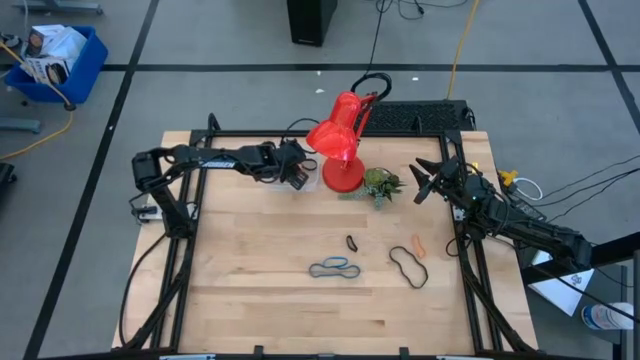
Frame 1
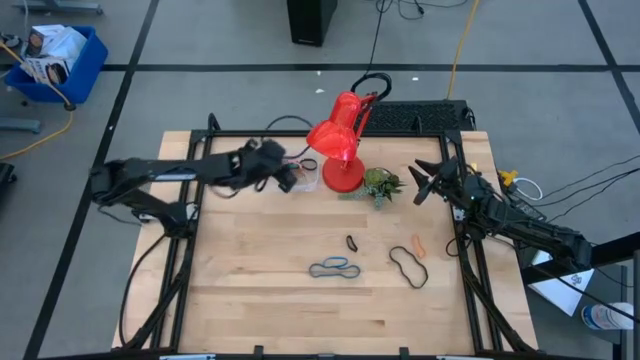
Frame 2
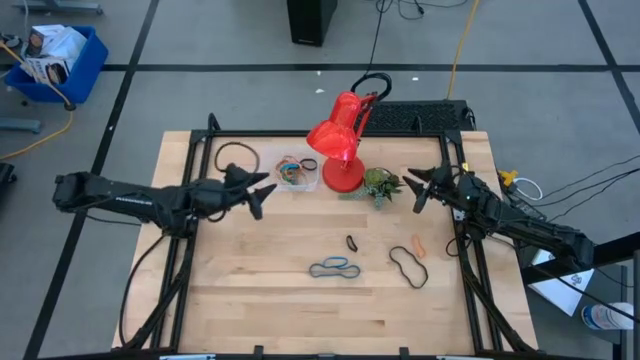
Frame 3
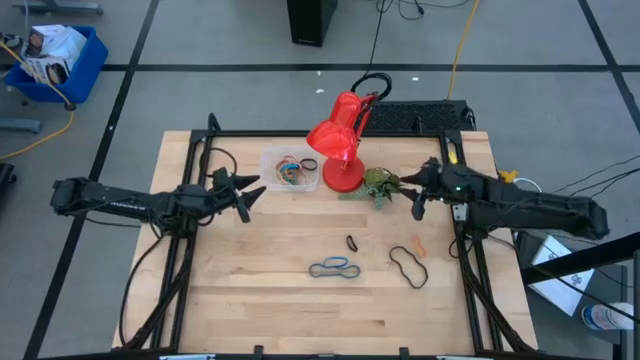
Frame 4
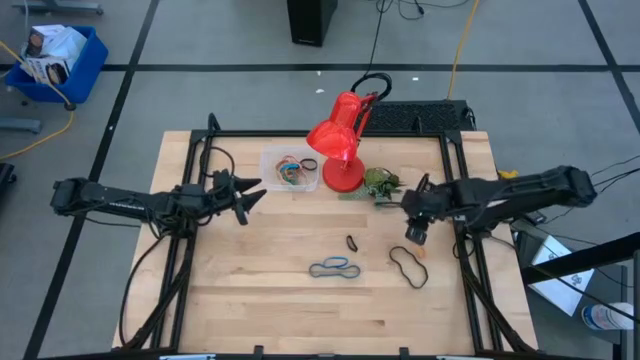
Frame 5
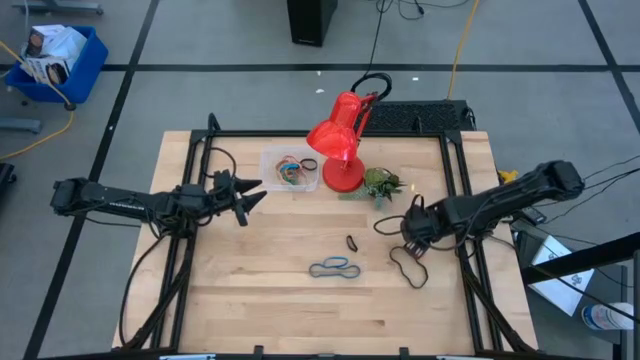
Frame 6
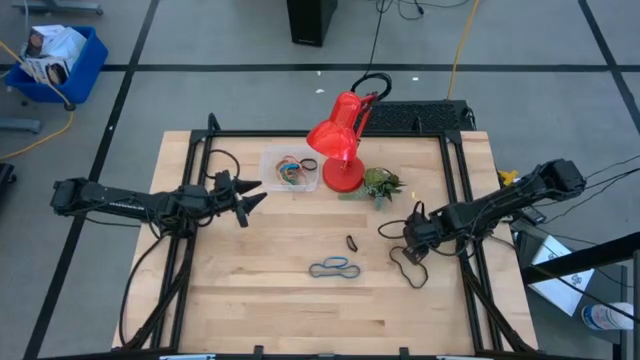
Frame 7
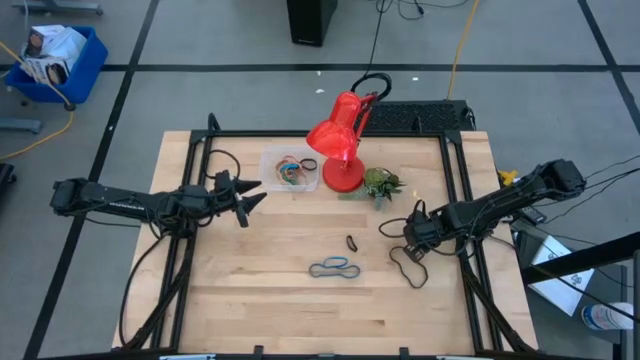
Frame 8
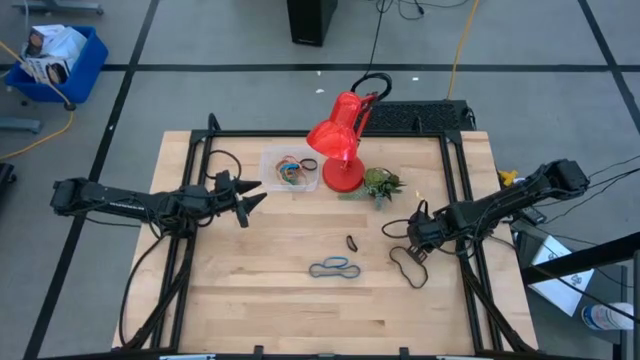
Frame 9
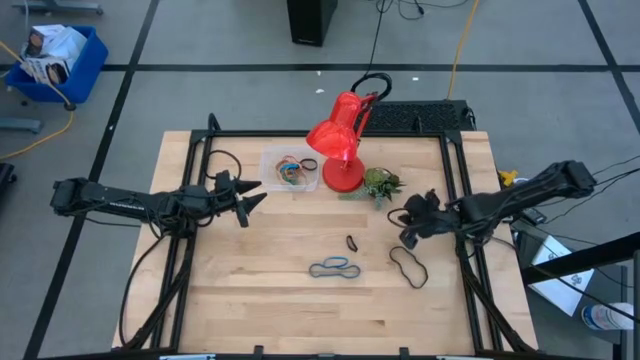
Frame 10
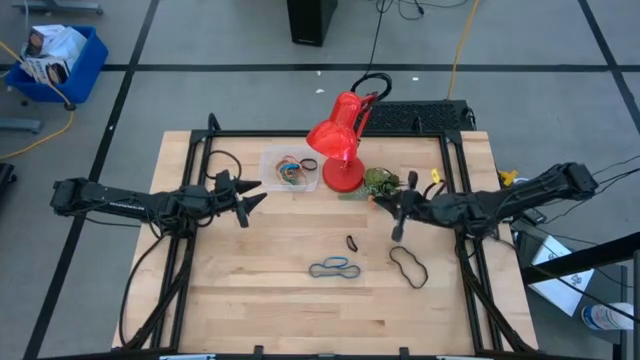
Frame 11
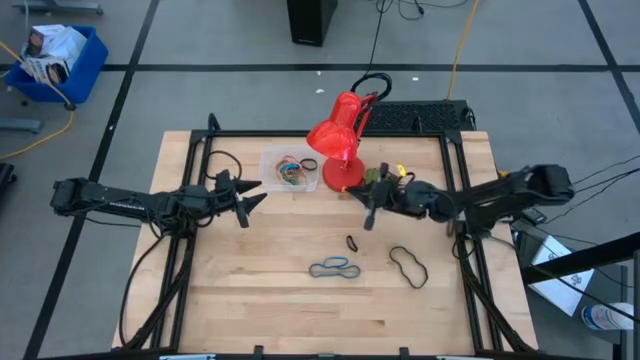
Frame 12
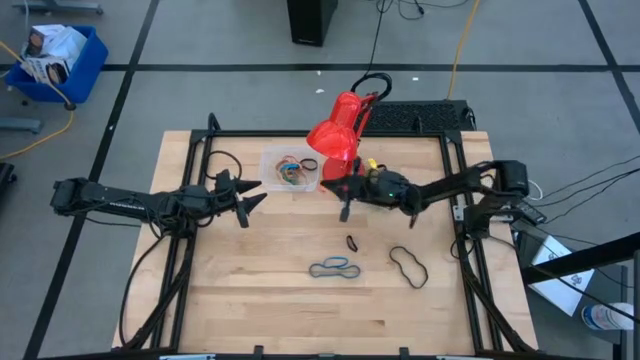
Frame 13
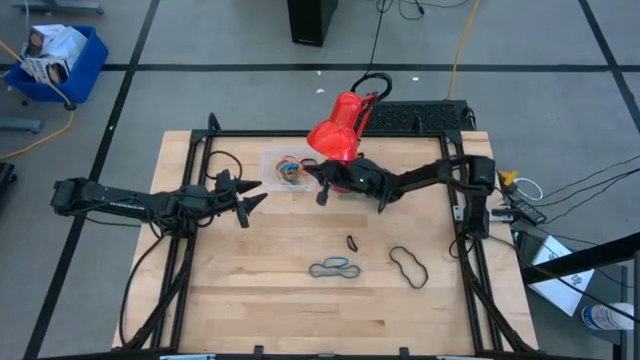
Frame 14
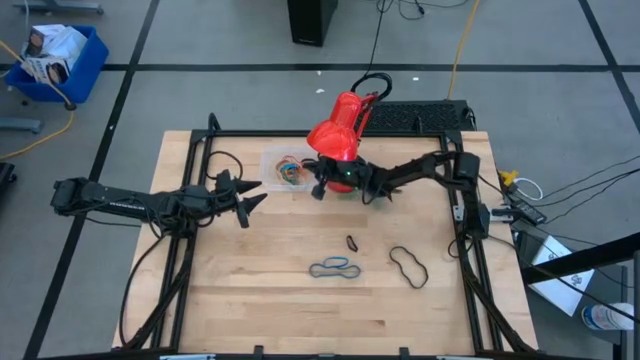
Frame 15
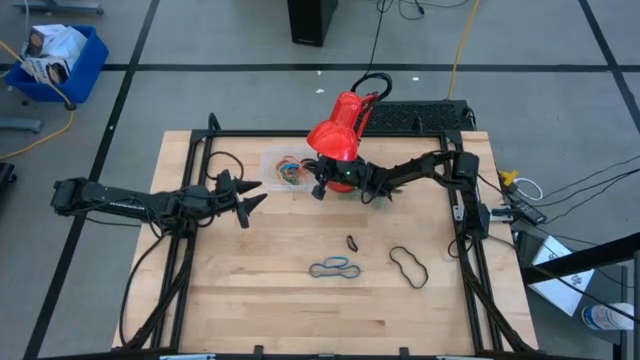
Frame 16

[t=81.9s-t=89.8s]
Task: Pick and place rubber bands into bin
Put the orange rubber band into the transparent bin

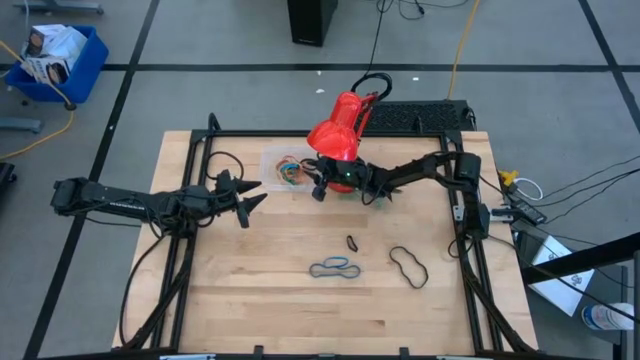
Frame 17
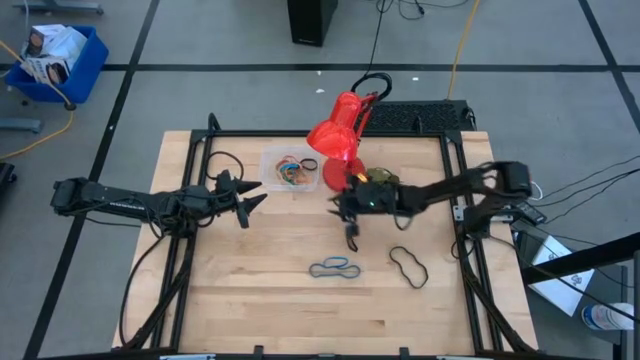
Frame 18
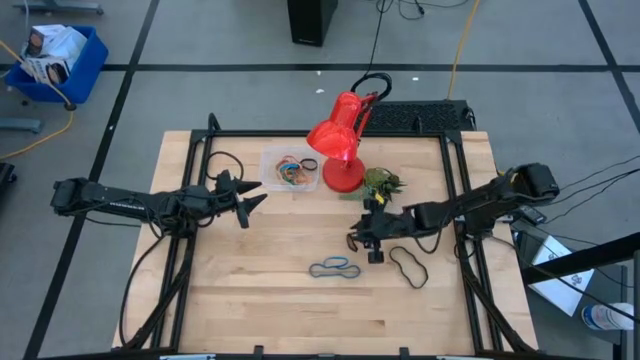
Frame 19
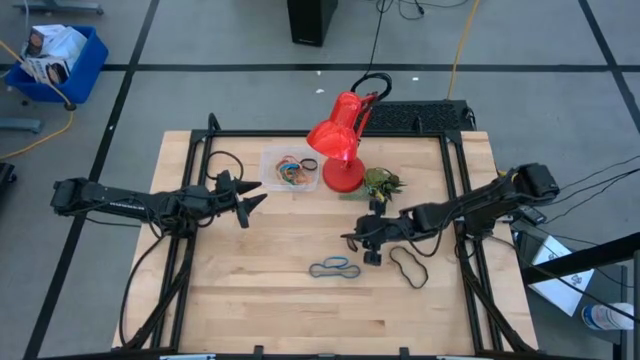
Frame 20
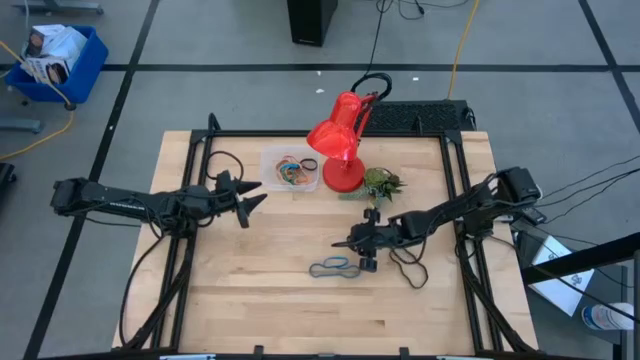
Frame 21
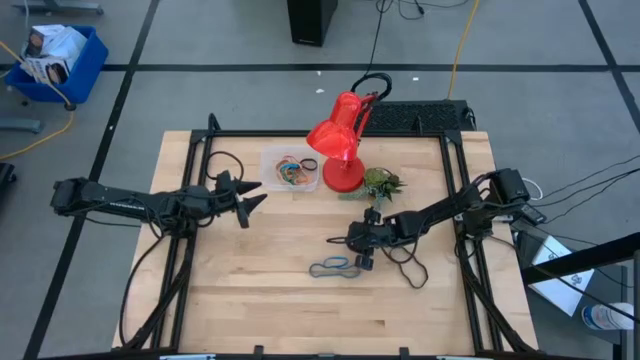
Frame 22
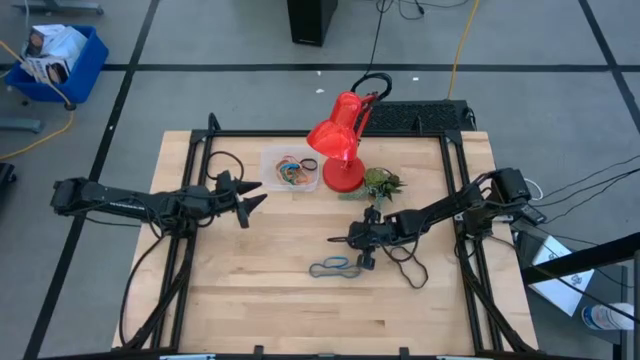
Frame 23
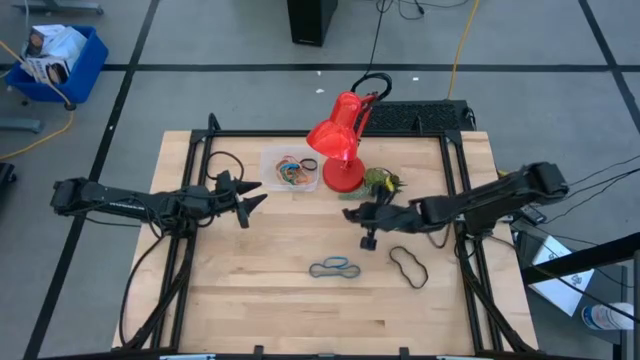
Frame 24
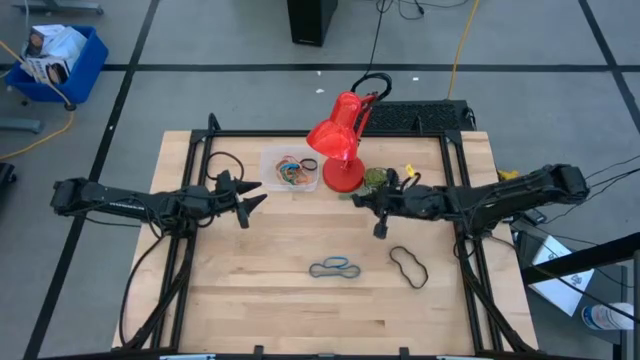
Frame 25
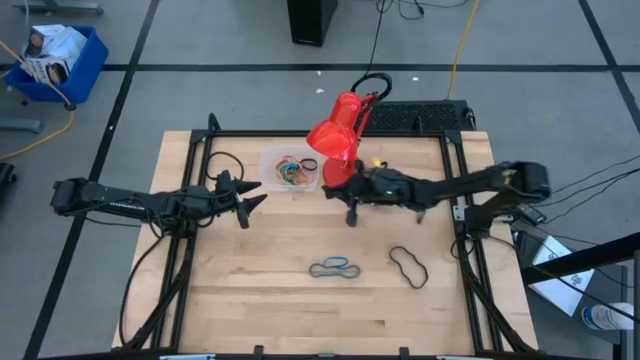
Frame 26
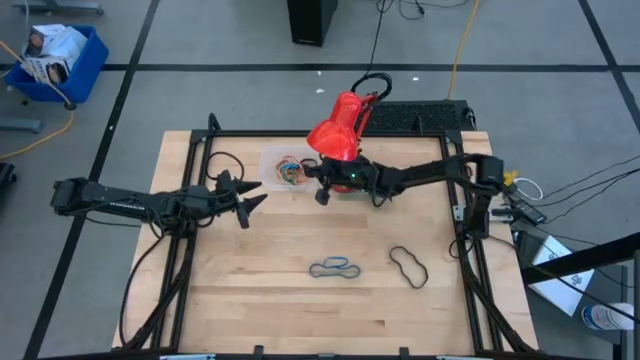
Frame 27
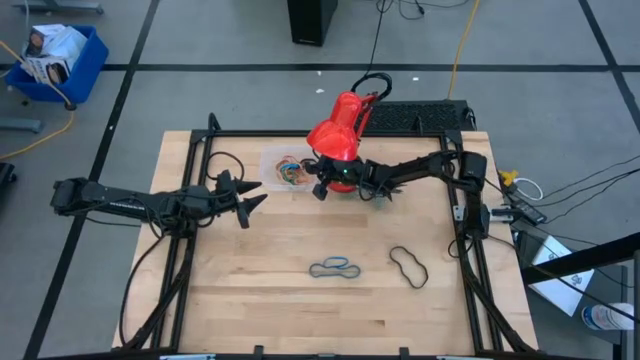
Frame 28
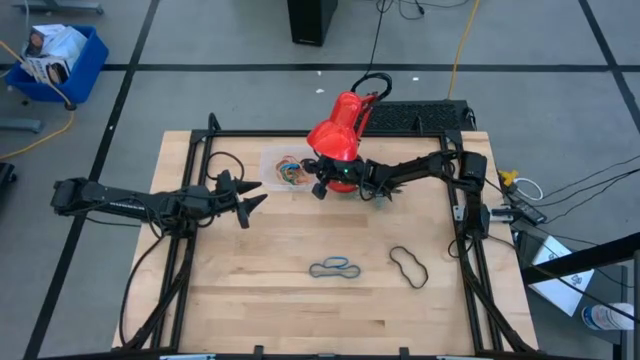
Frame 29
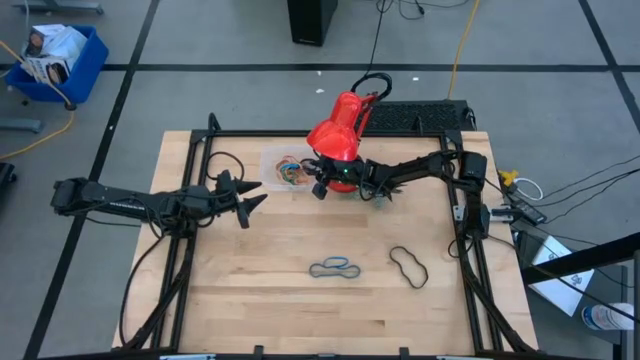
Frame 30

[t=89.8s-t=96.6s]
Put the left black rubber band into the transparent bin

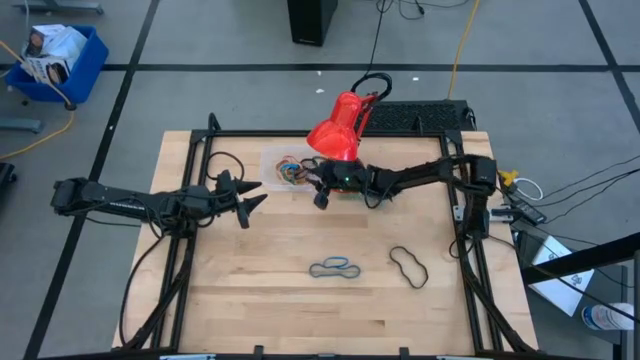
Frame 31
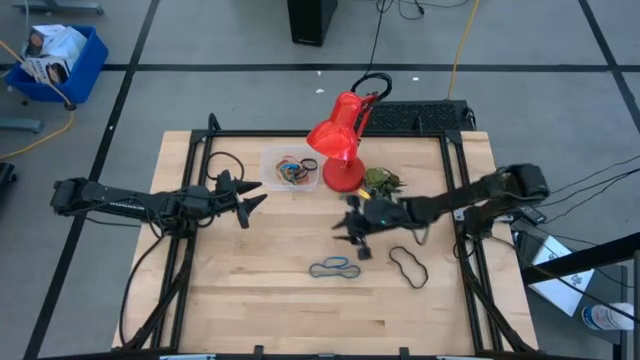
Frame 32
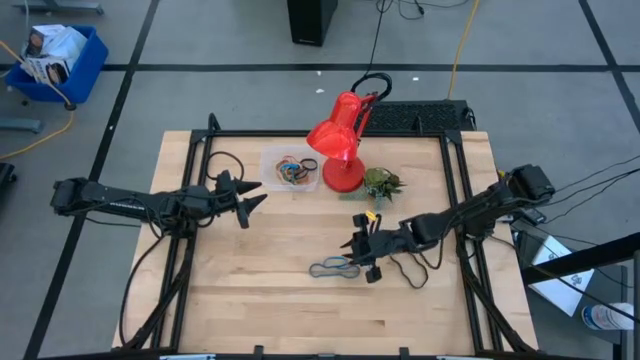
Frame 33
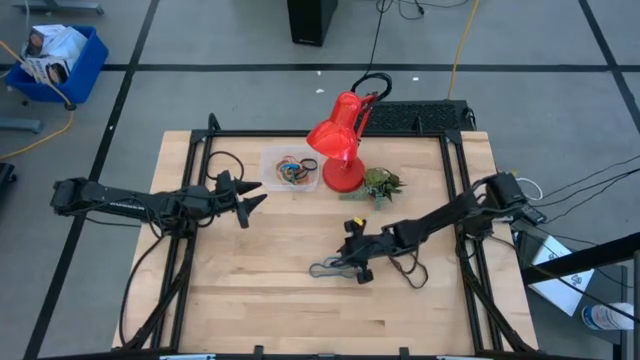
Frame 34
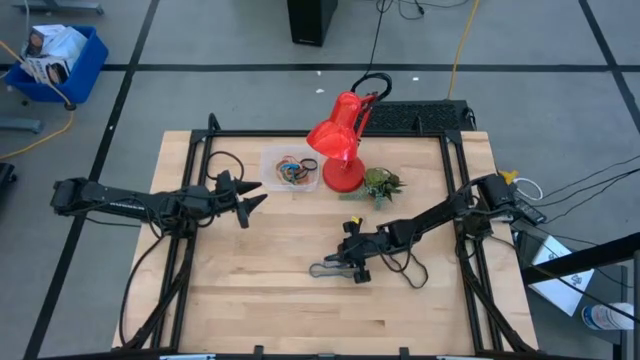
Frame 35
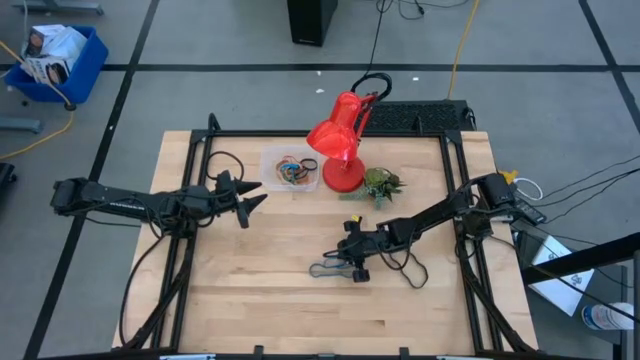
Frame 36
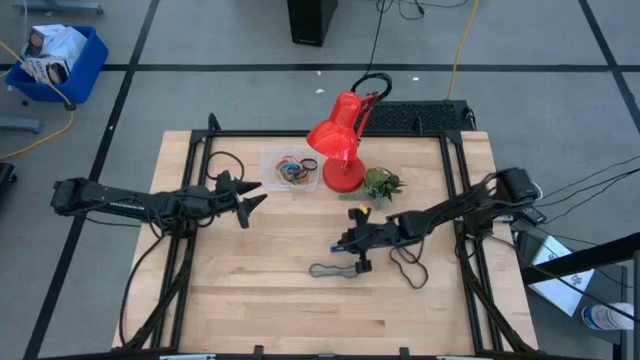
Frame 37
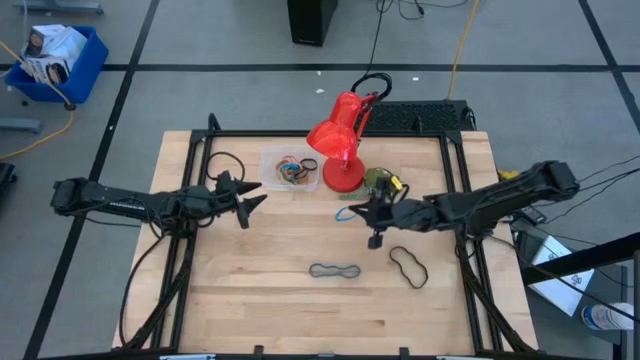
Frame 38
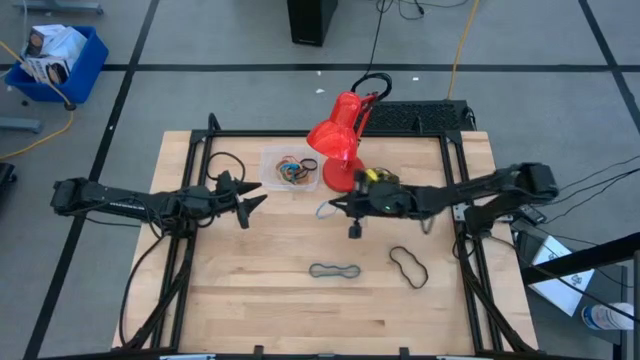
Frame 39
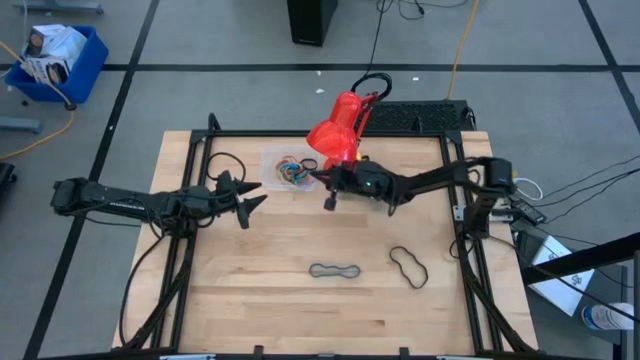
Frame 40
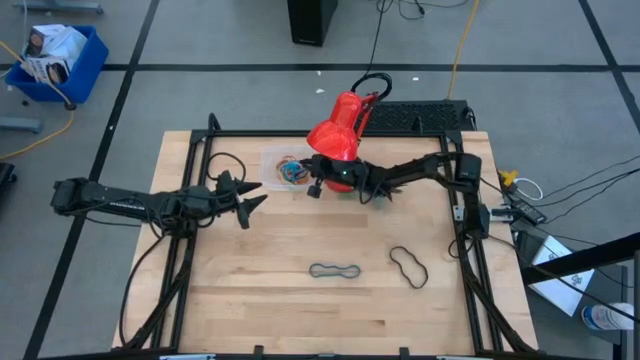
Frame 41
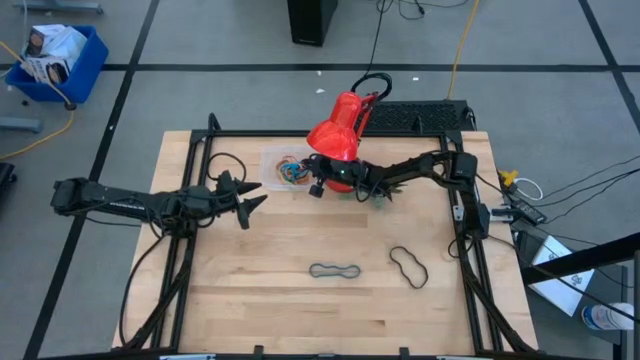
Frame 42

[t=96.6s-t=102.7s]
Put the top blue rubber band into the transparent bin

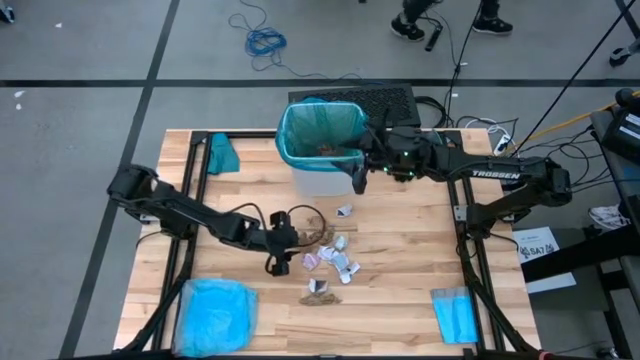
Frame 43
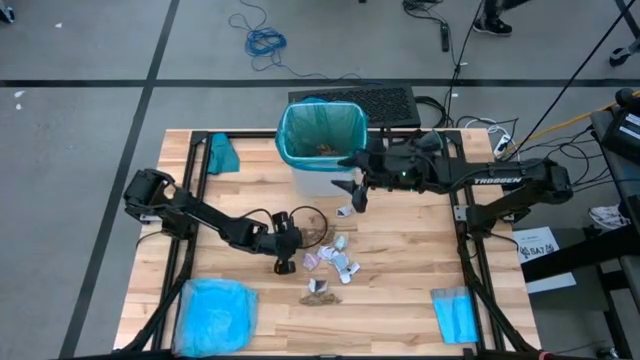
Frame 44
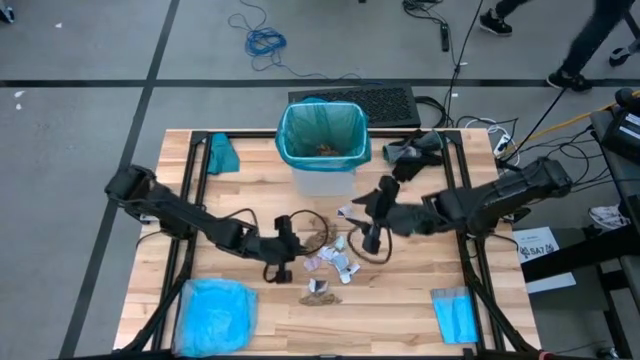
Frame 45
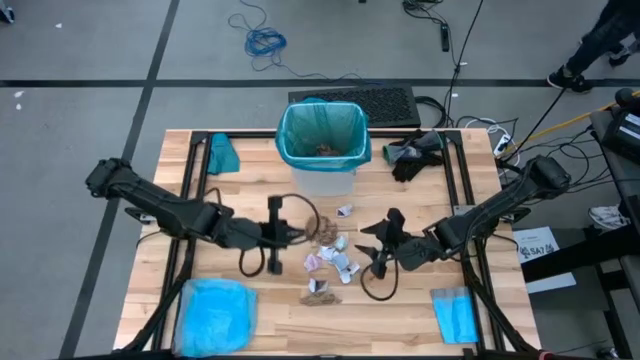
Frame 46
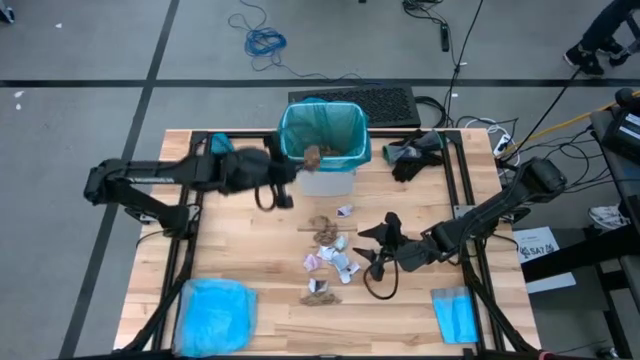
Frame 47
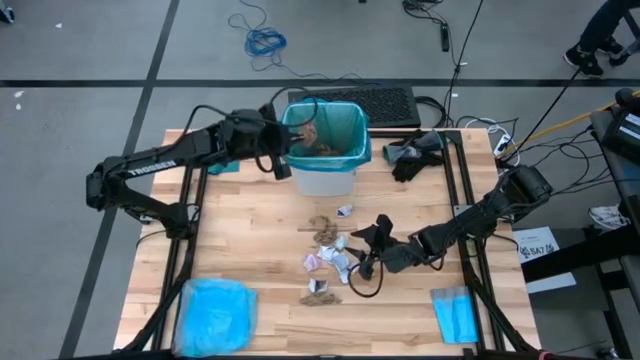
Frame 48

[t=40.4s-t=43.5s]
Task: place trash/remove bag and relplace
Put the brown napkin into the trash bin
